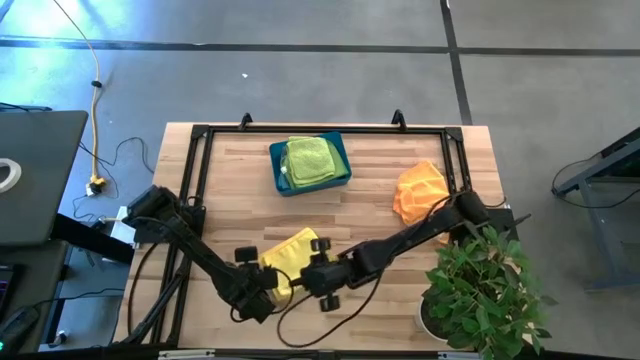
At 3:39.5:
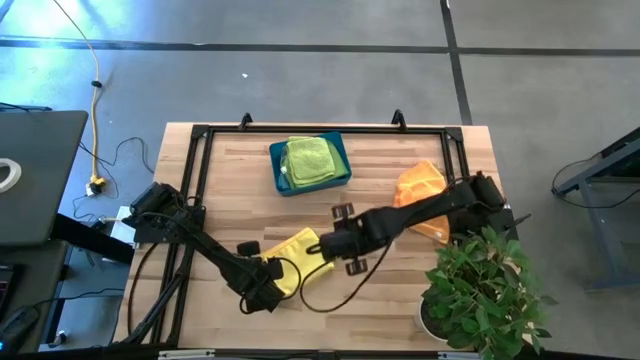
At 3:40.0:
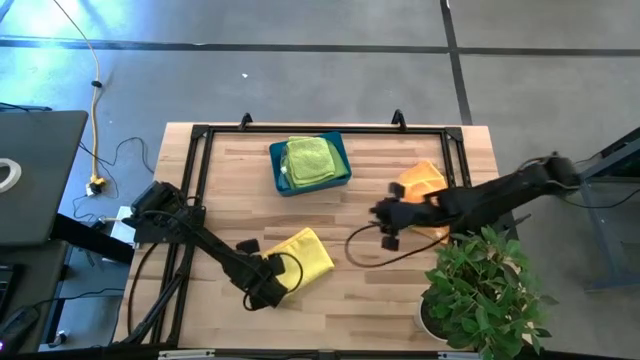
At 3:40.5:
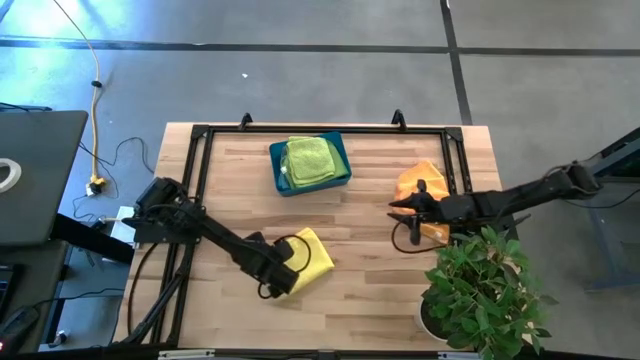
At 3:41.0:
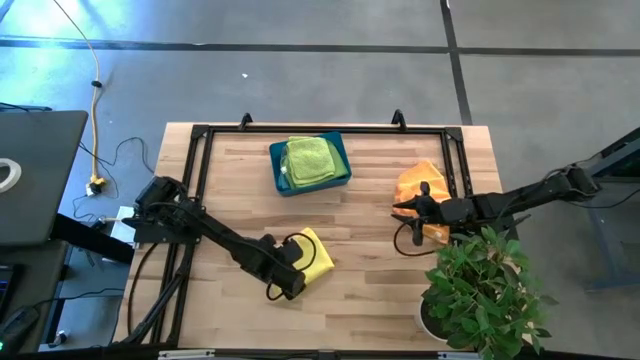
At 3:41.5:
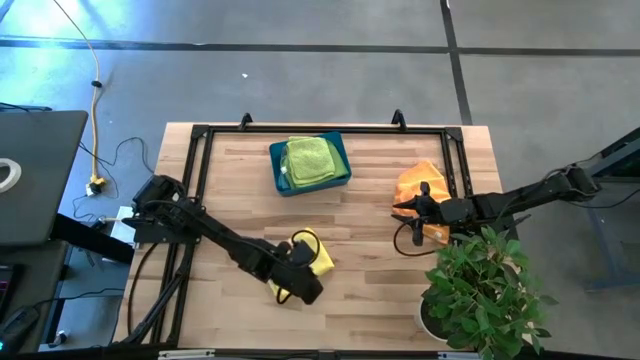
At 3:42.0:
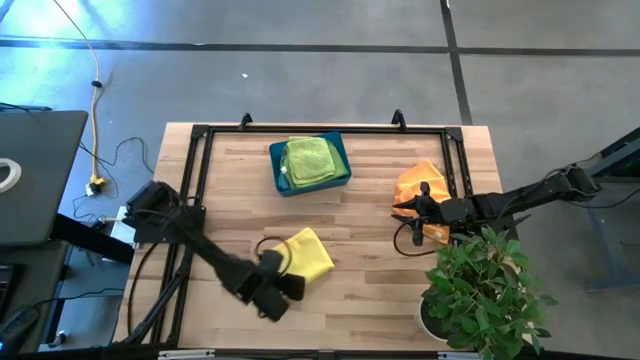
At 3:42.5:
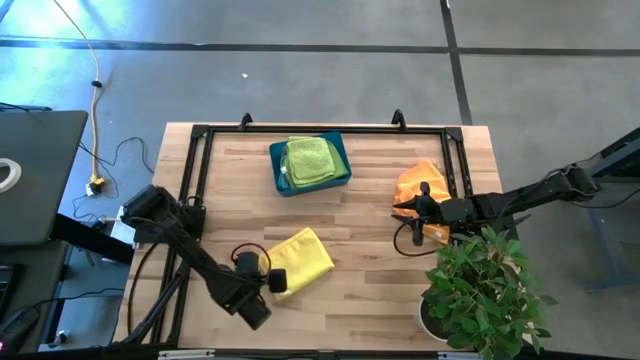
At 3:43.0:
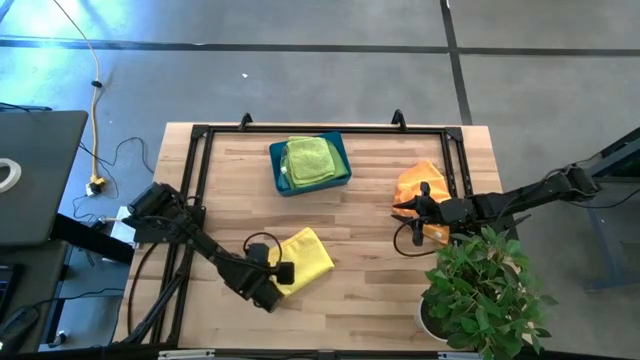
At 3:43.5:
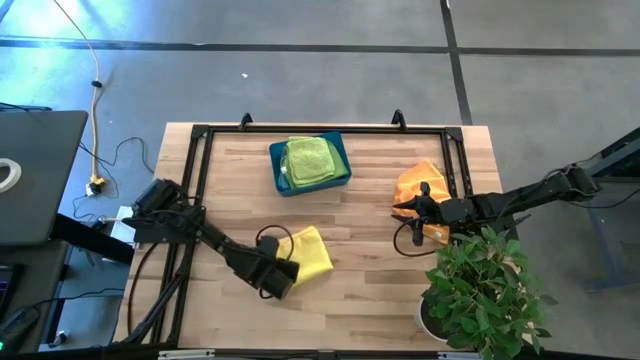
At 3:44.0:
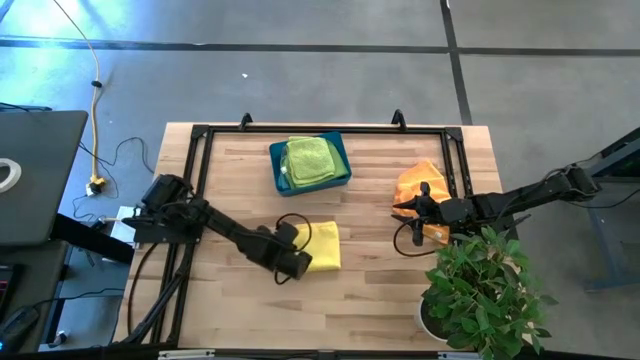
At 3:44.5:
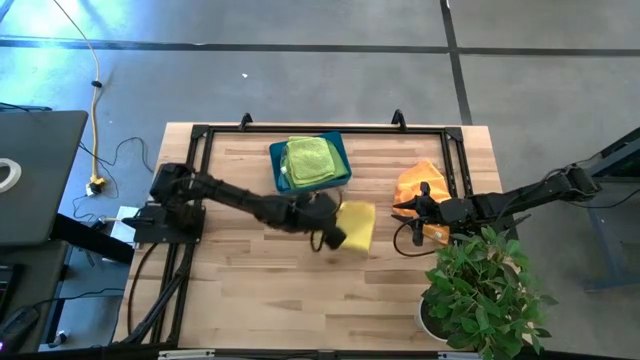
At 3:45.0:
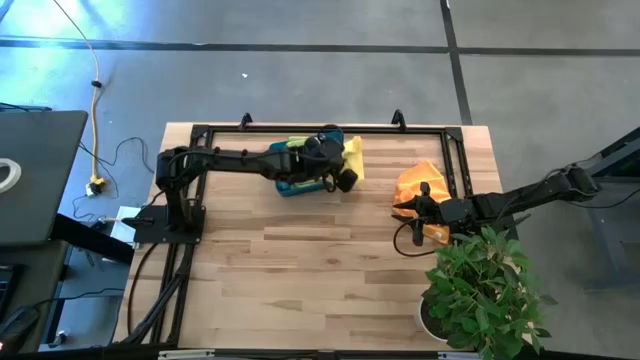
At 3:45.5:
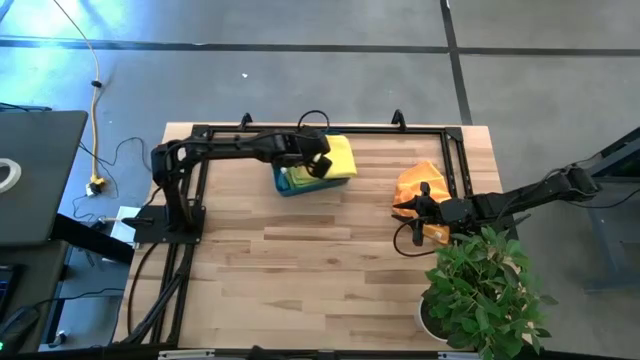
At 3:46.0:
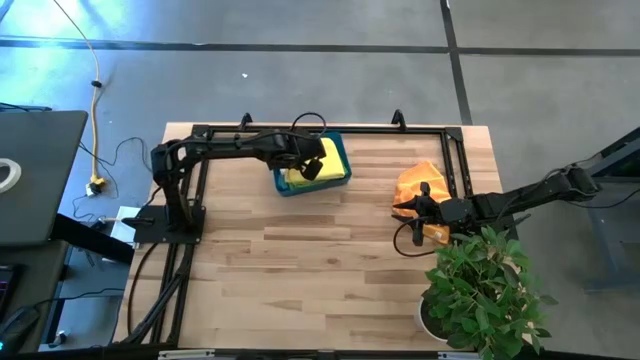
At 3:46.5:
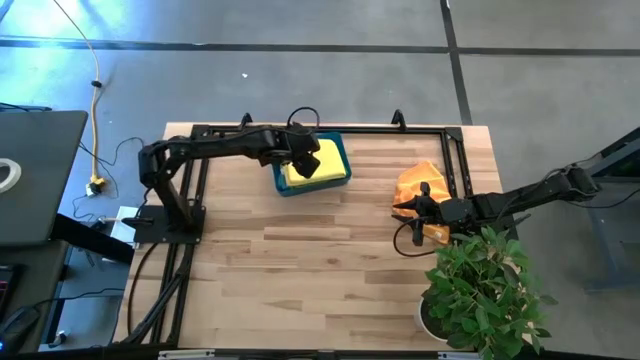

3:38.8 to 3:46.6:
Task: Fold microfiber towels
Stack the yellow microfiber cloth on the green microfiber cloth in the blue bin

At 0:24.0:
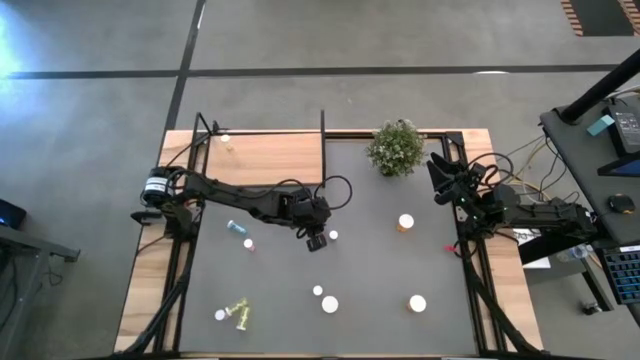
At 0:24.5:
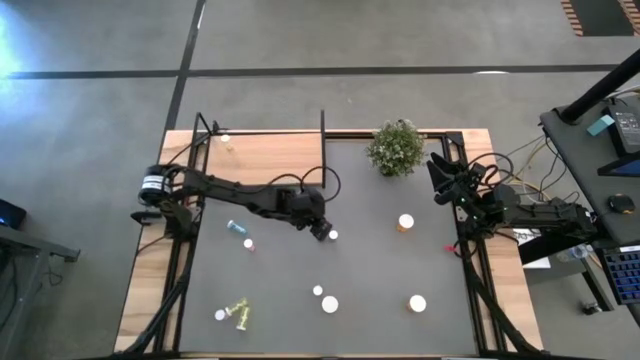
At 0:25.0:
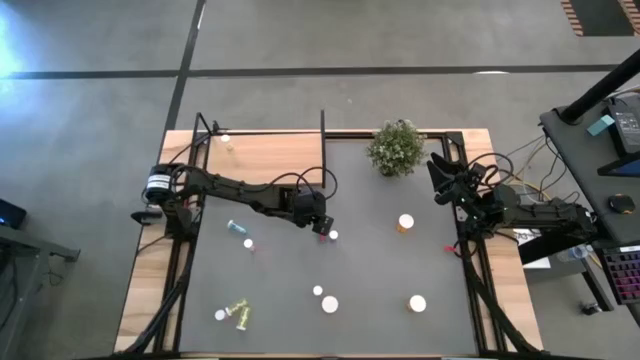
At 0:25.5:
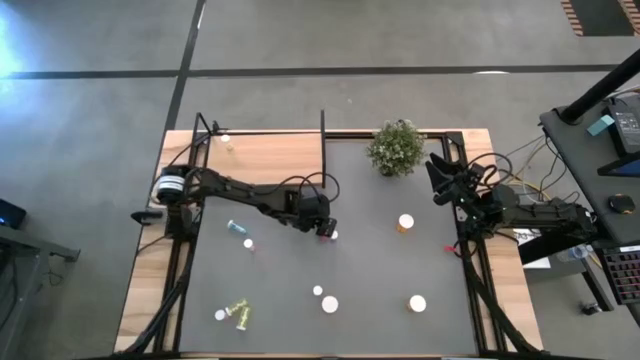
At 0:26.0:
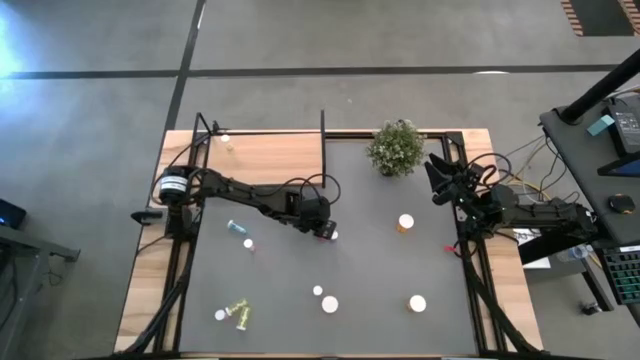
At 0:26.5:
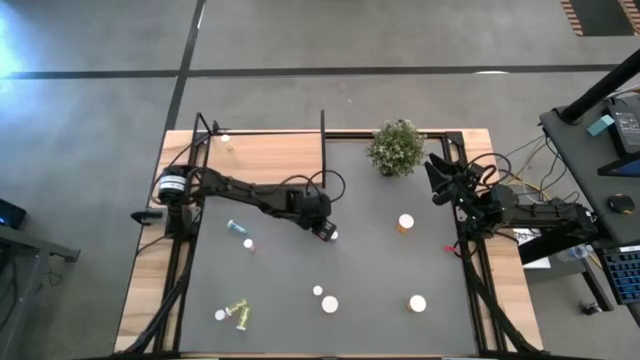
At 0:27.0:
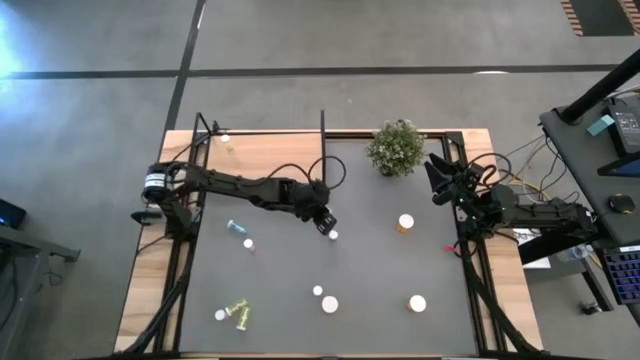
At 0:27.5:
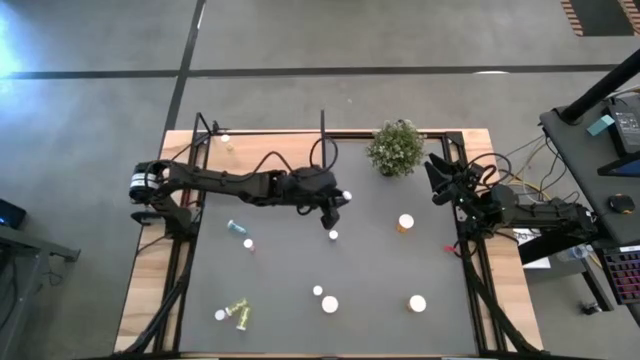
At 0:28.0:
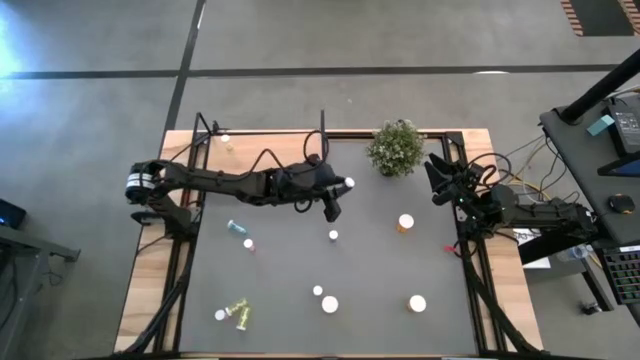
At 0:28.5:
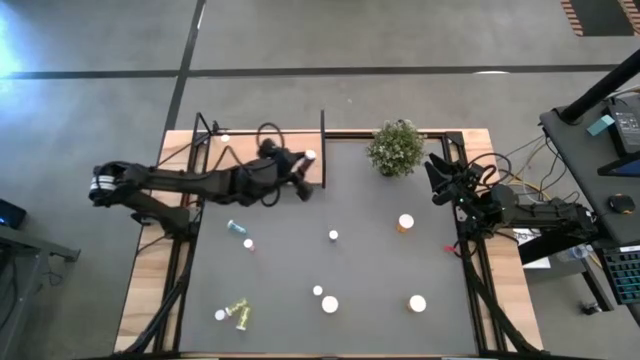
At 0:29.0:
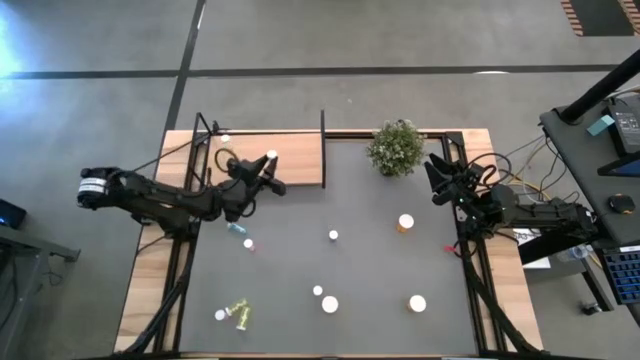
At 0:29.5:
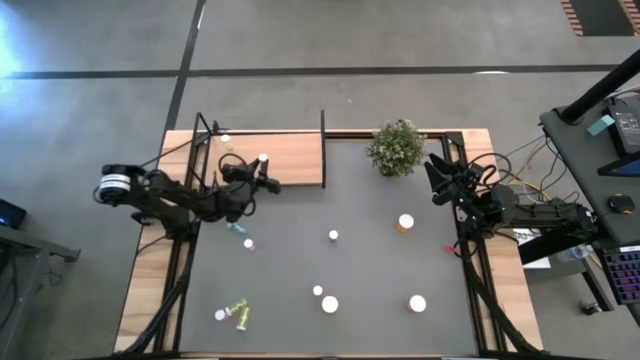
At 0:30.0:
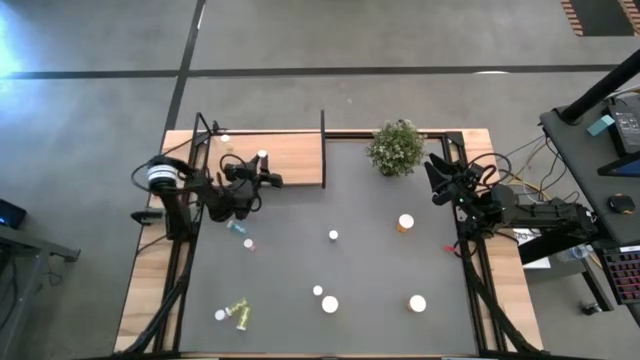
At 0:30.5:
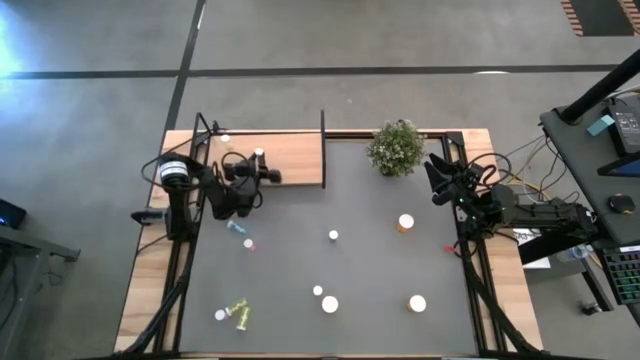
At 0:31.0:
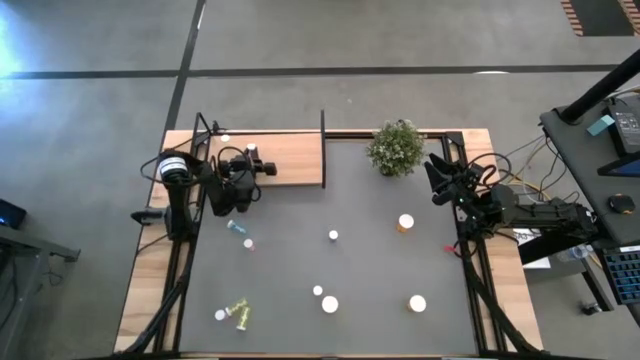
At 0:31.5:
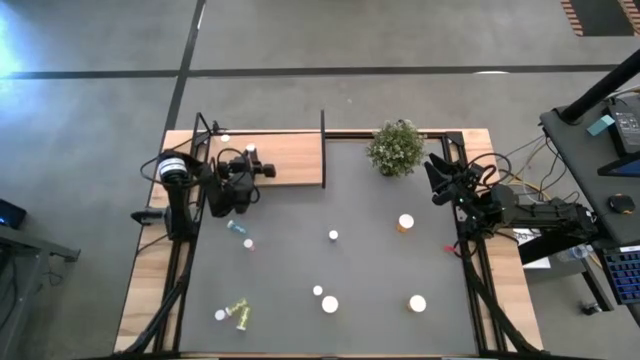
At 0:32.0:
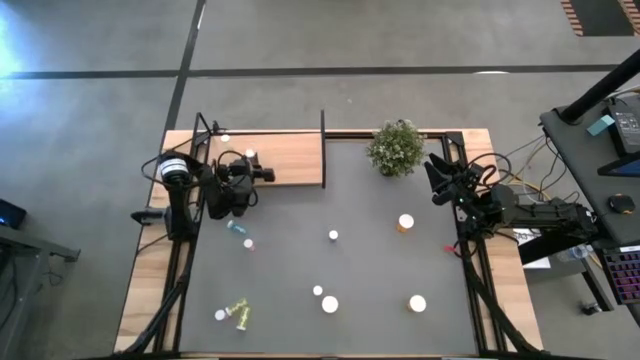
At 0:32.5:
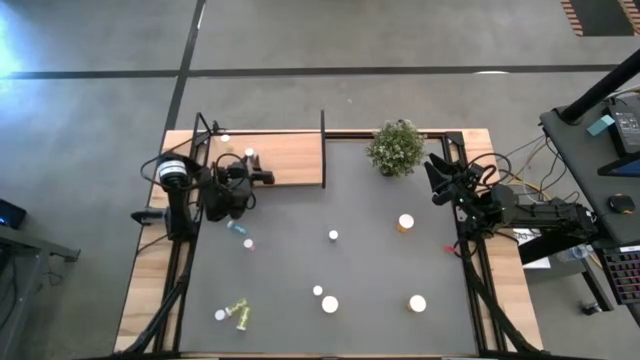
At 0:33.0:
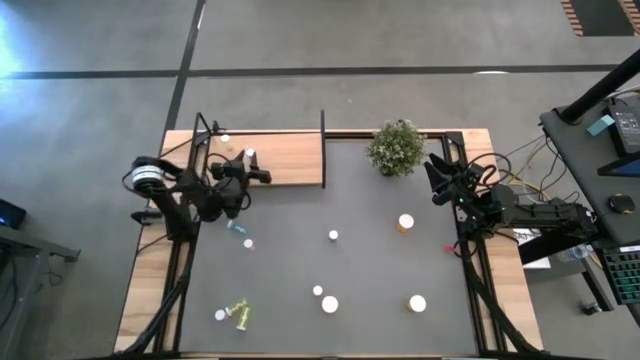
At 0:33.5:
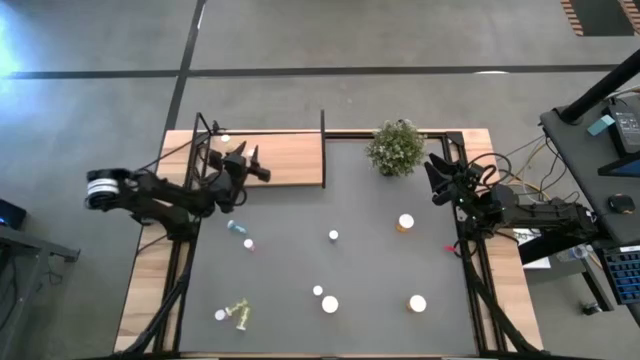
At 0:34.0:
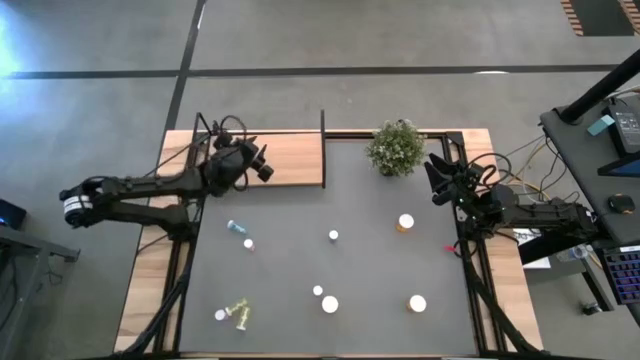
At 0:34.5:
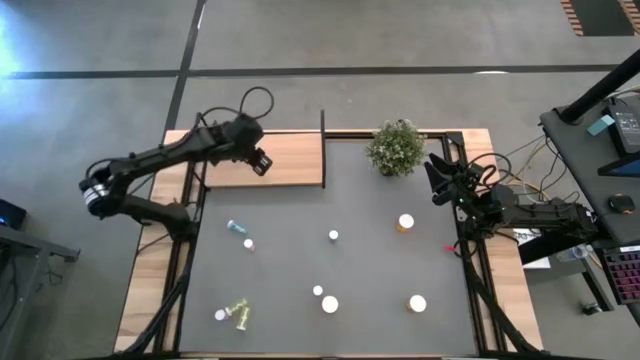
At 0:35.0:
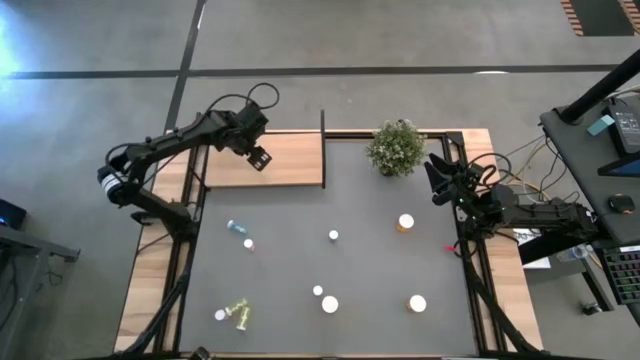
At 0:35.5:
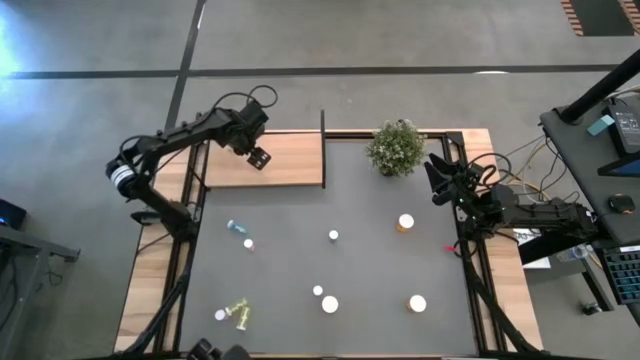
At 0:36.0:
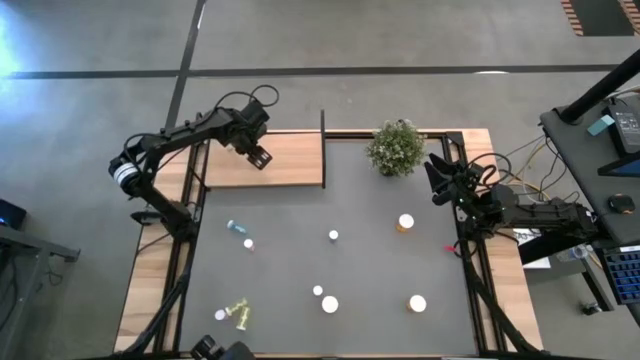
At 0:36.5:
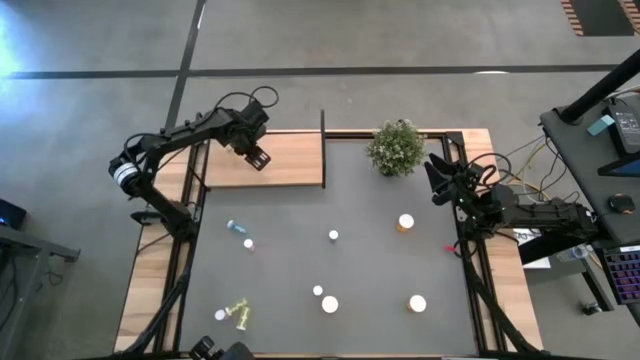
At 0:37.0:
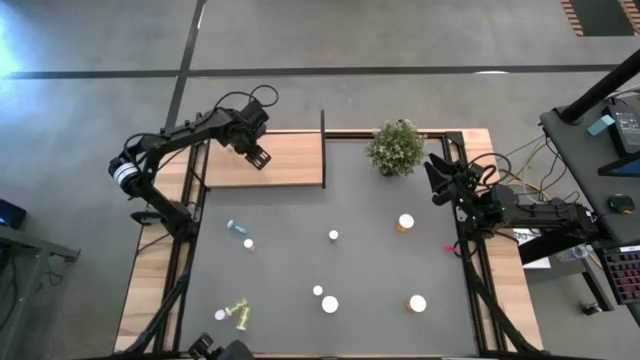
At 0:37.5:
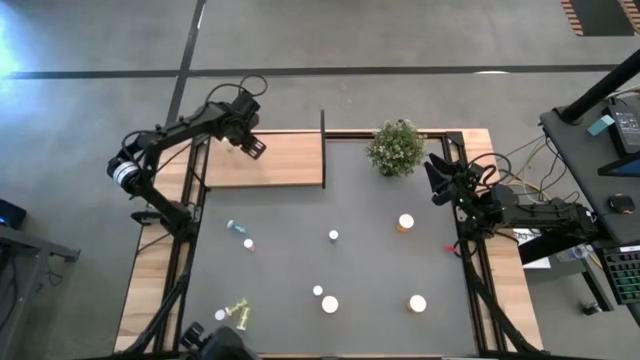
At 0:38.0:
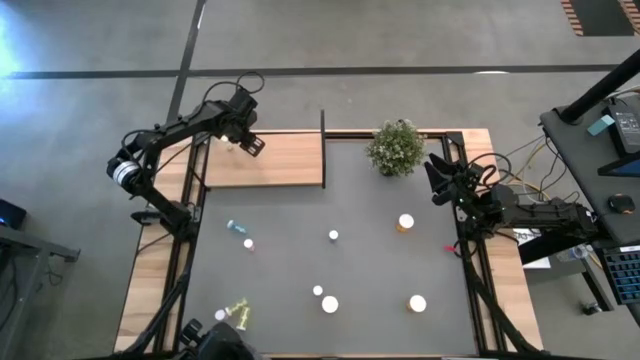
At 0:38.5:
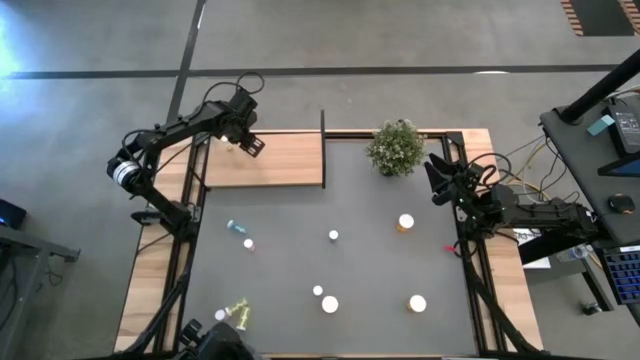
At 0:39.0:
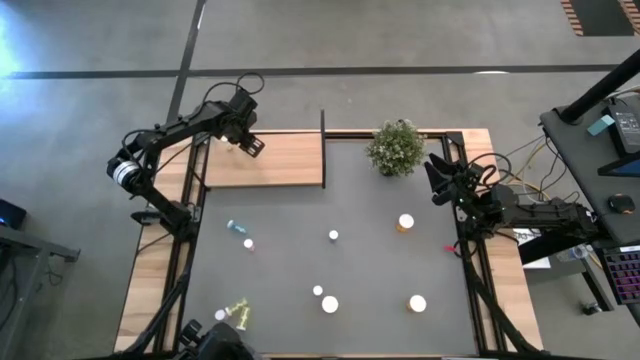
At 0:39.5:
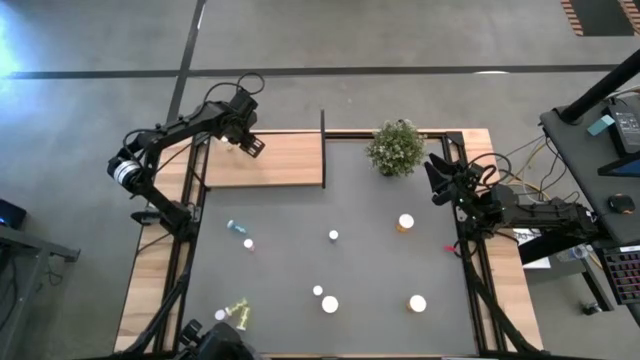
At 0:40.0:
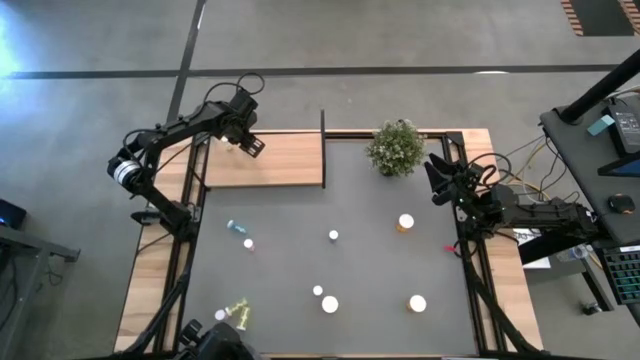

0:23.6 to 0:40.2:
Task: Pick and place medicine bottles onto shelf by color
Put the middle blue pill bottle on the shelf
